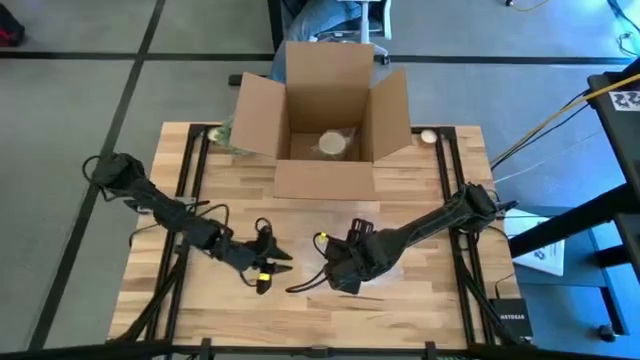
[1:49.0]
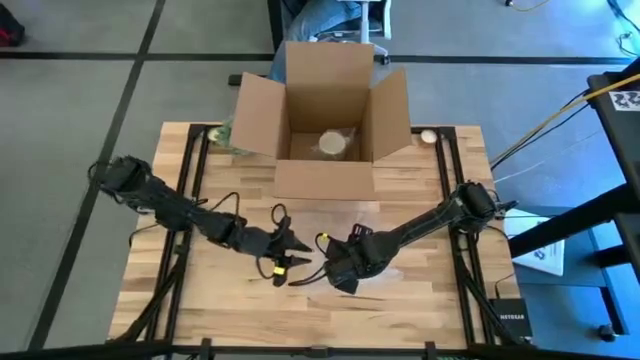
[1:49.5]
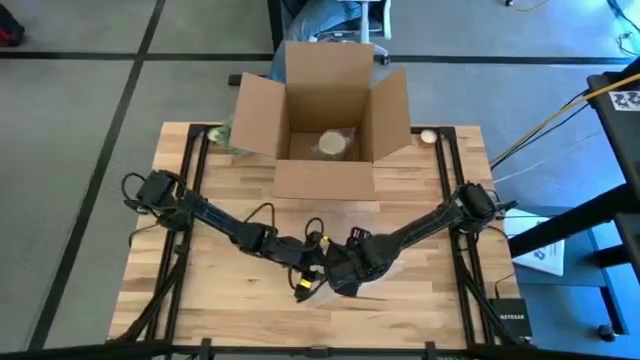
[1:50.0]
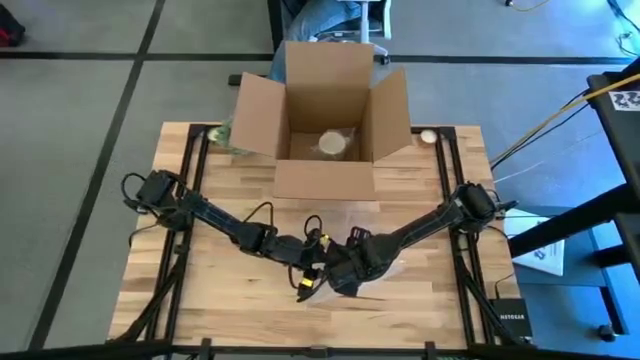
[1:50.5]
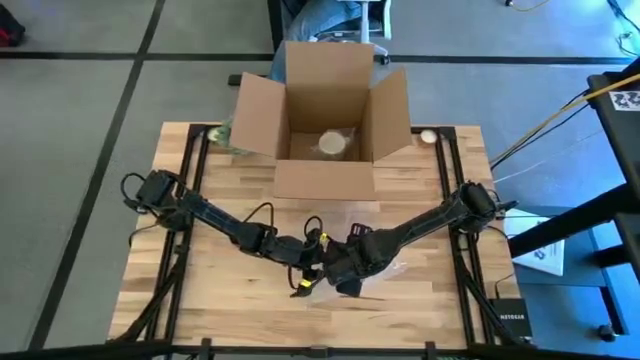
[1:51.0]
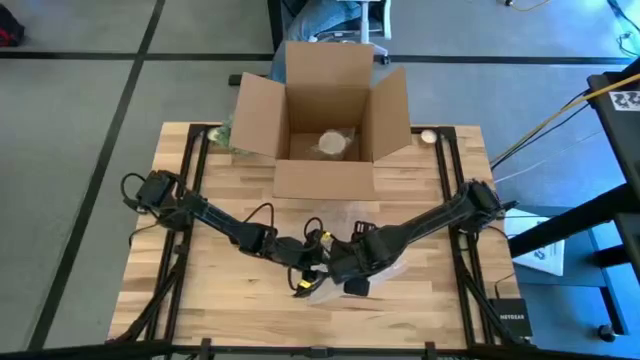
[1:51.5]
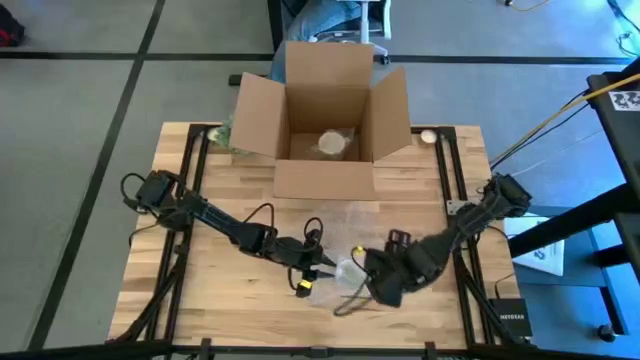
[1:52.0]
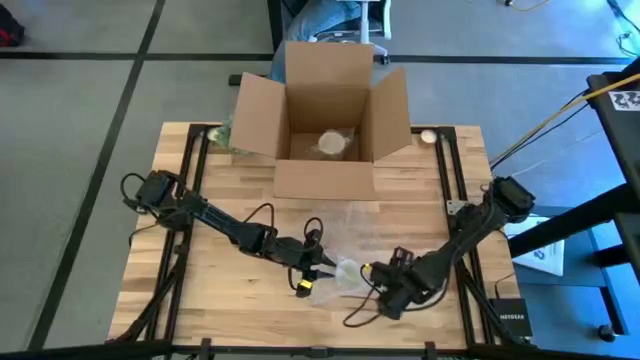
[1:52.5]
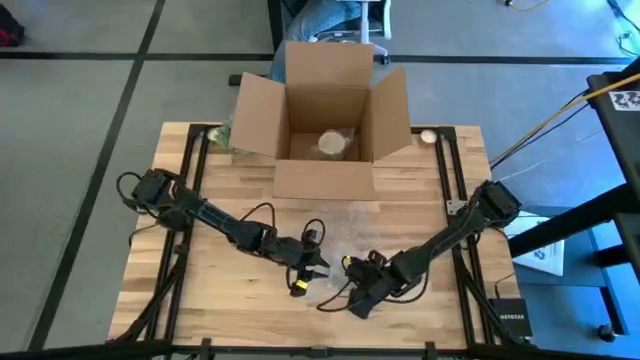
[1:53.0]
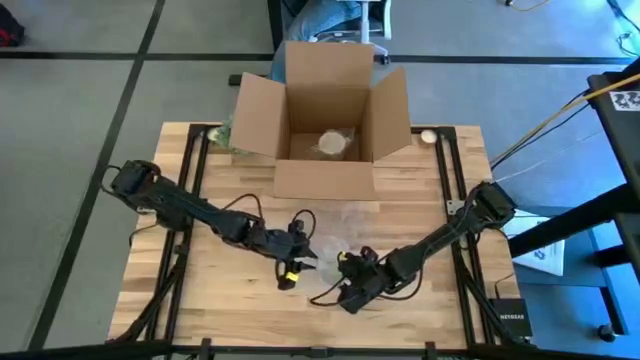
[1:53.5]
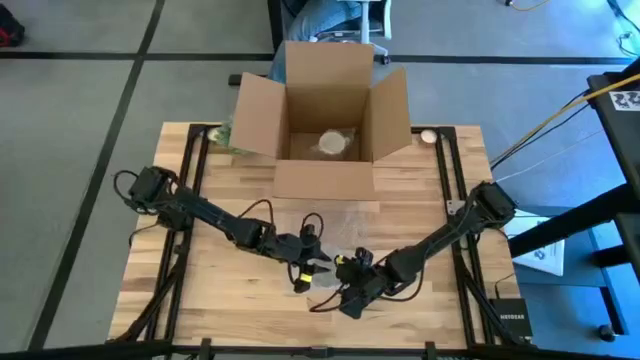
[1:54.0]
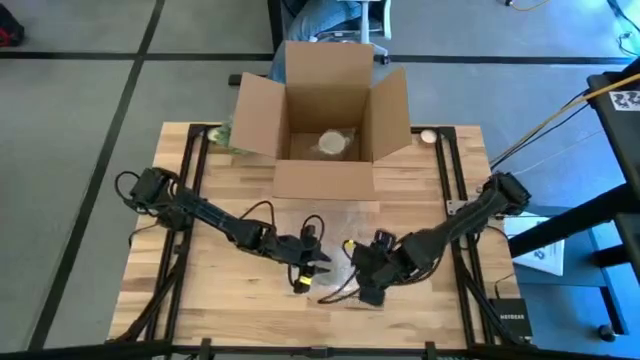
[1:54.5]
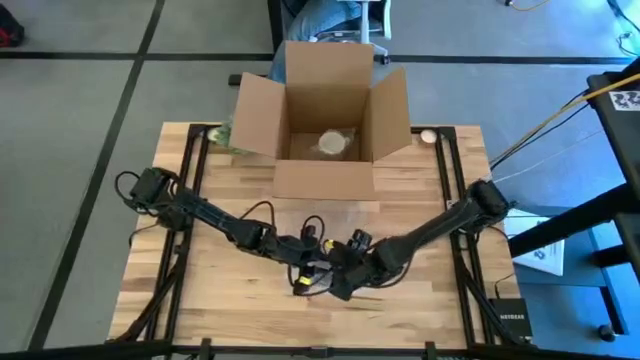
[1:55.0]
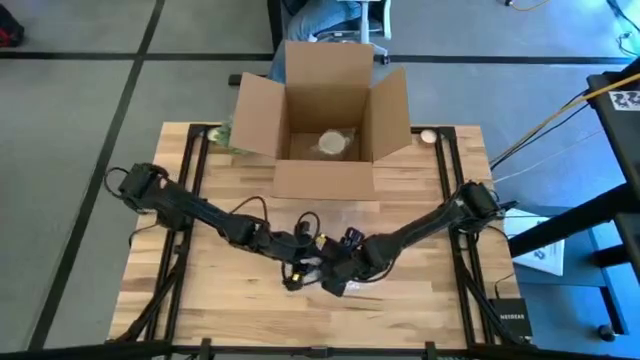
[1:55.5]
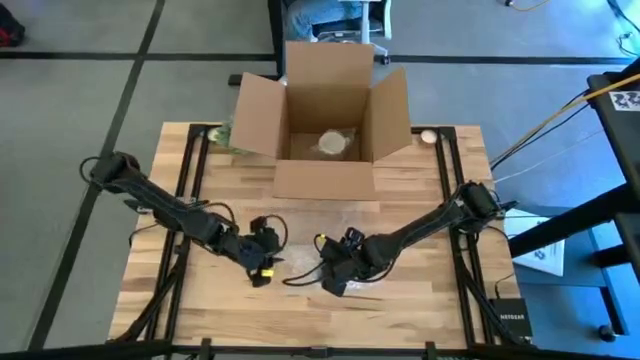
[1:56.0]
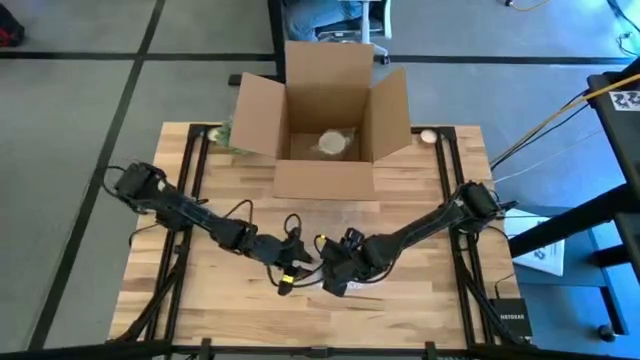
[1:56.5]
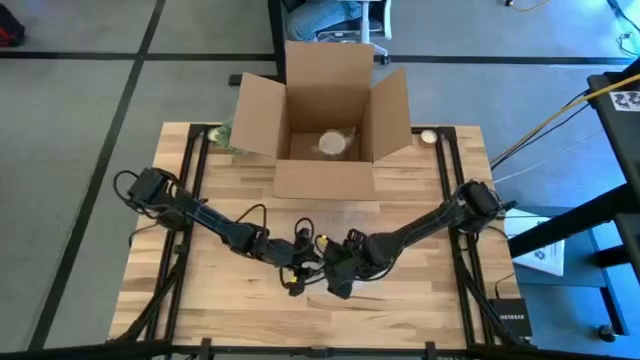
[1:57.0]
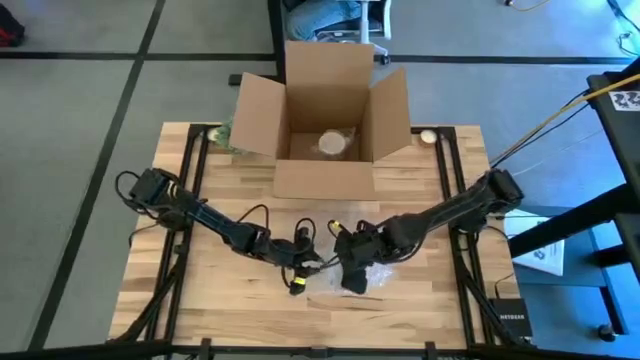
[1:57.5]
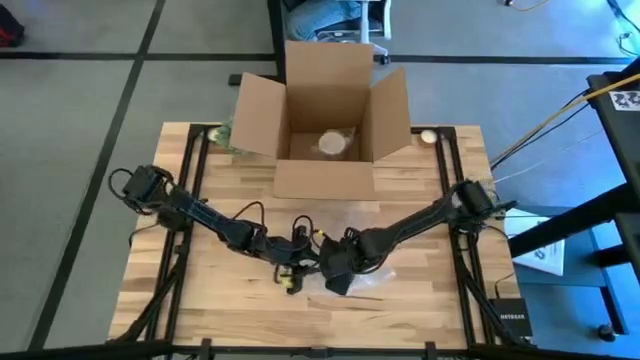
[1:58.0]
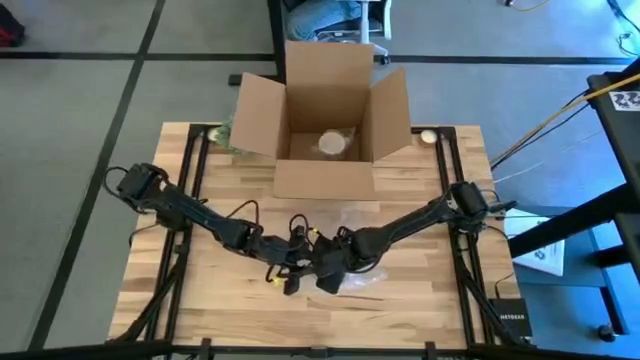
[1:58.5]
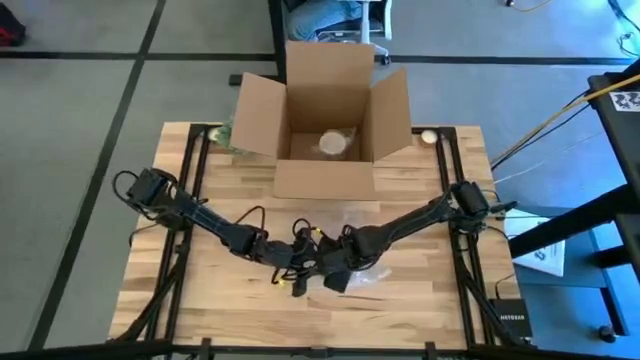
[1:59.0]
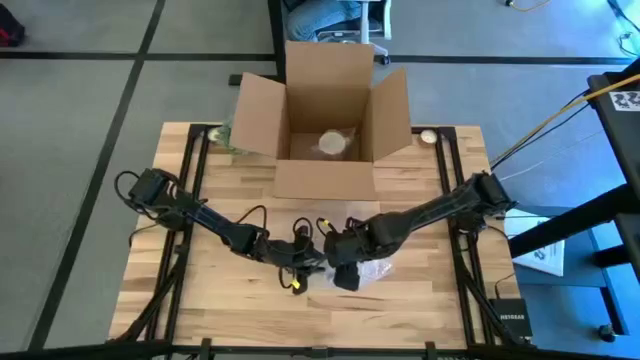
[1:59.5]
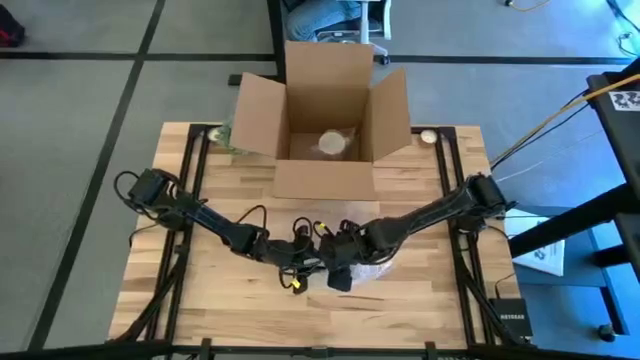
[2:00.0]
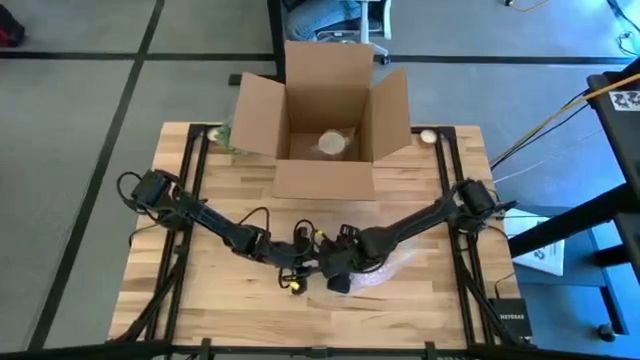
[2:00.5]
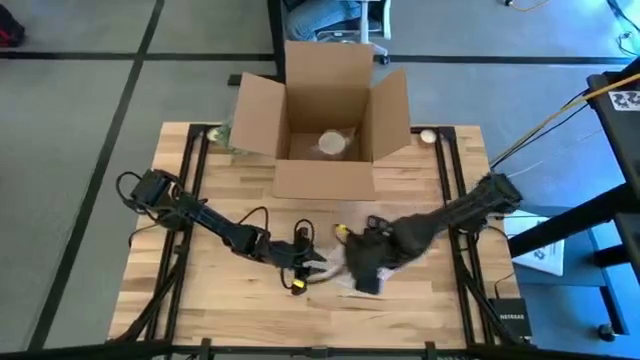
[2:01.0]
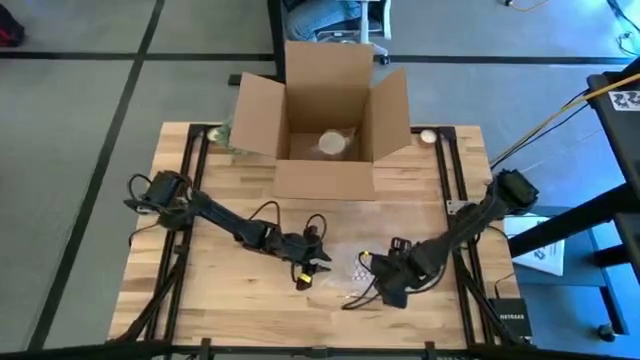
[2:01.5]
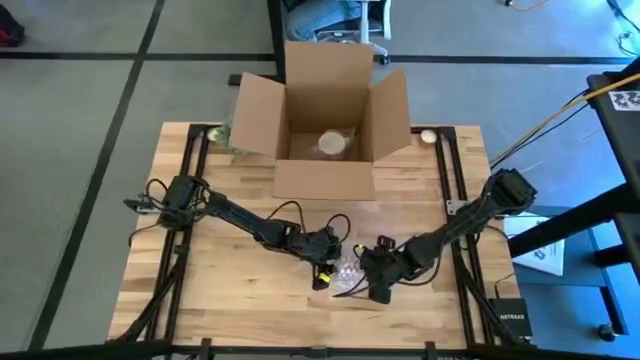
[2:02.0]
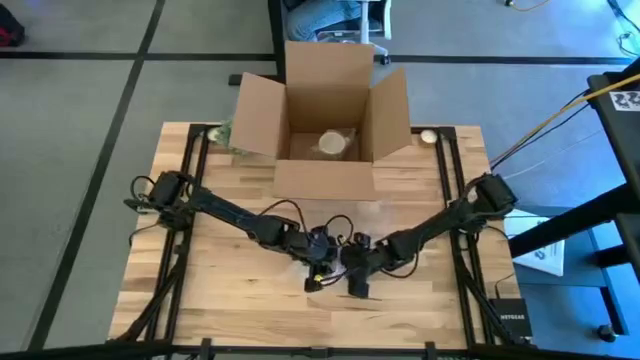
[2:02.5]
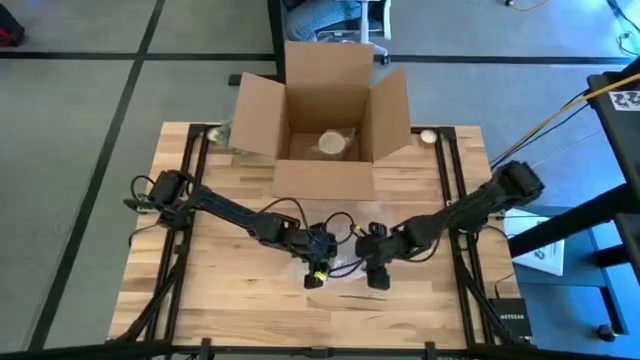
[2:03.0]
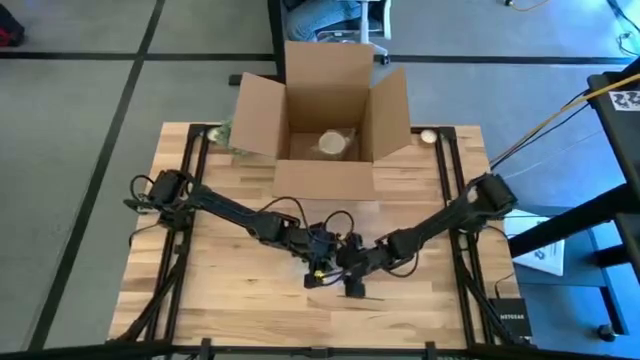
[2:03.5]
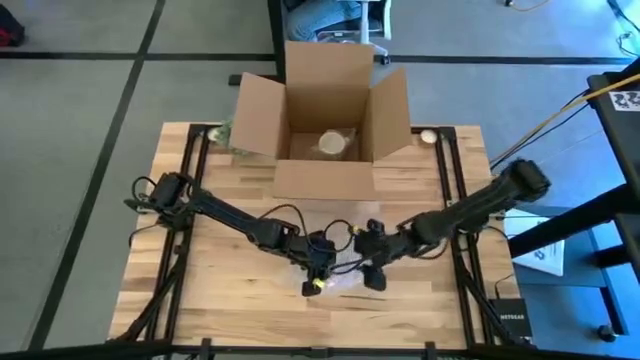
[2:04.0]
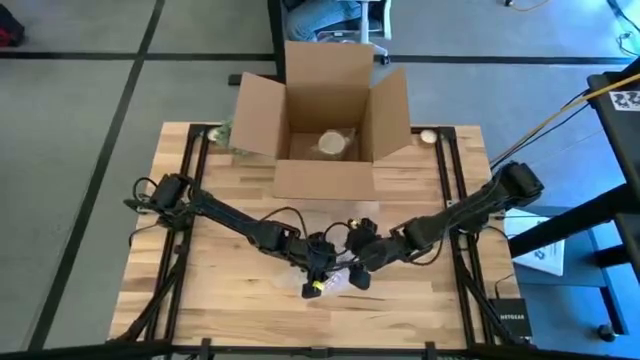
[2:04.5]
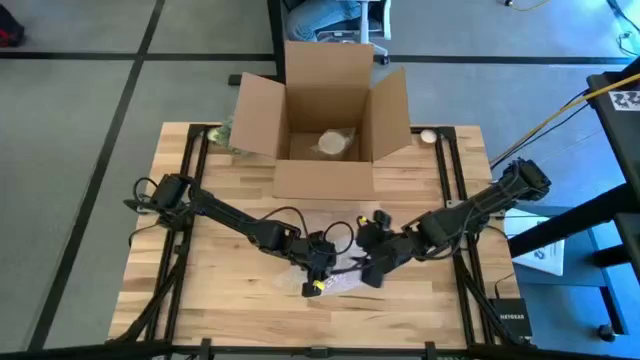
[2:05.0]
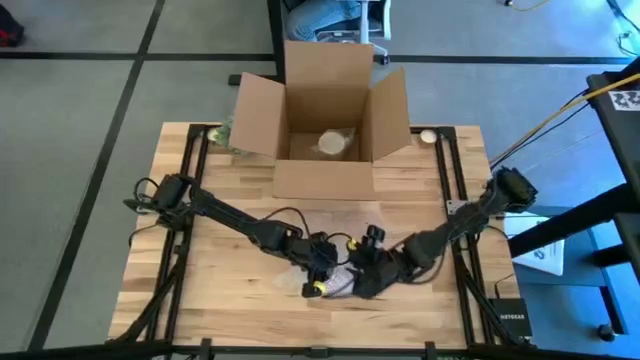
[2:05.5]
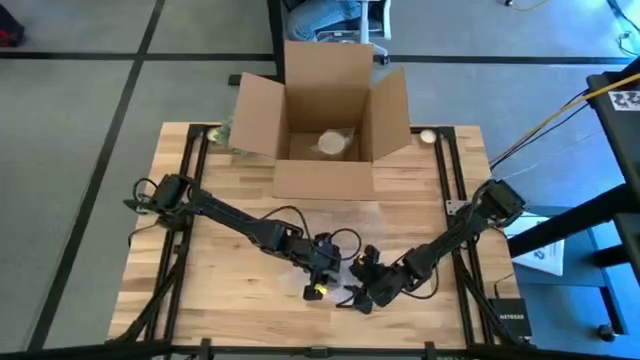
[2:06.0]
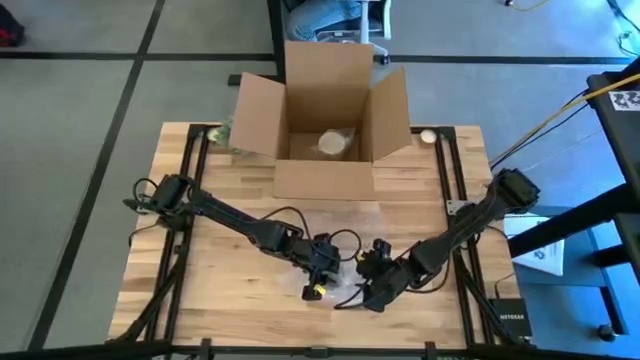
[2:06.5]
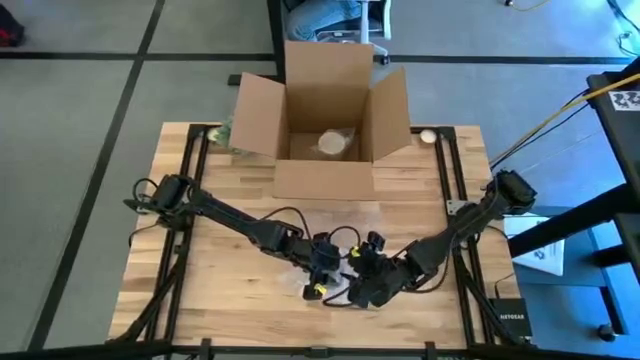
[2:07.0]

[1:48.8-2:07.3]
Task: wrap mug
Wrap the red mug with bubble wrap

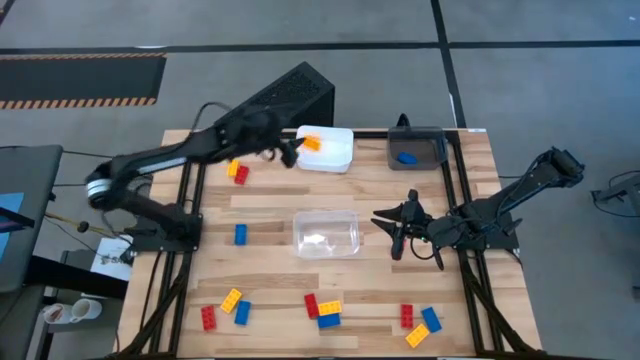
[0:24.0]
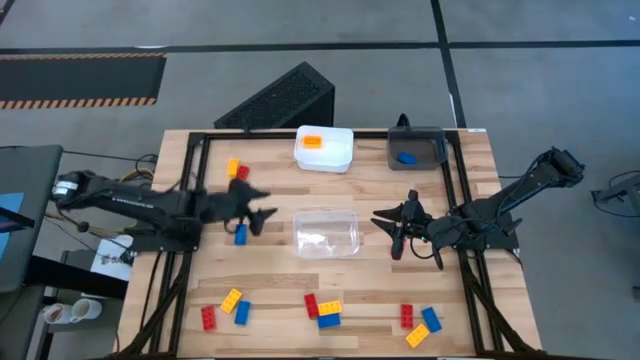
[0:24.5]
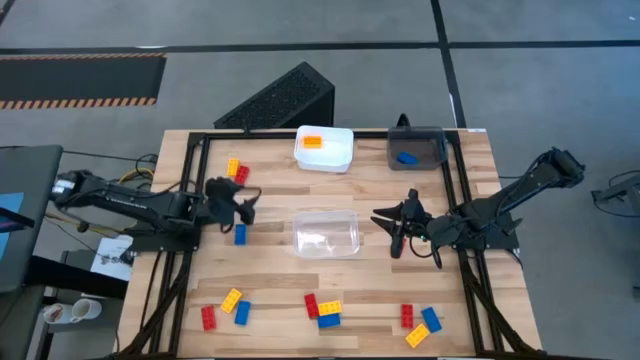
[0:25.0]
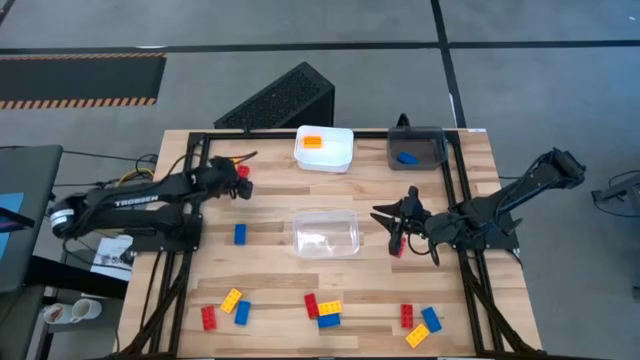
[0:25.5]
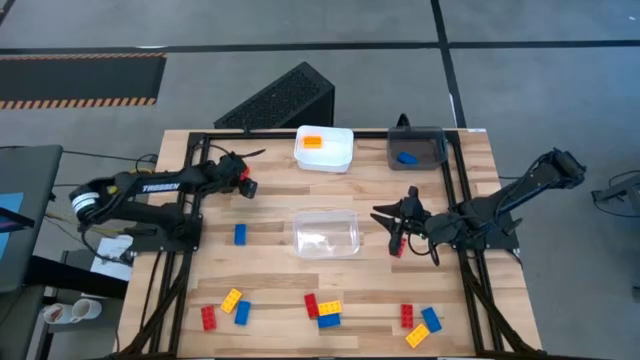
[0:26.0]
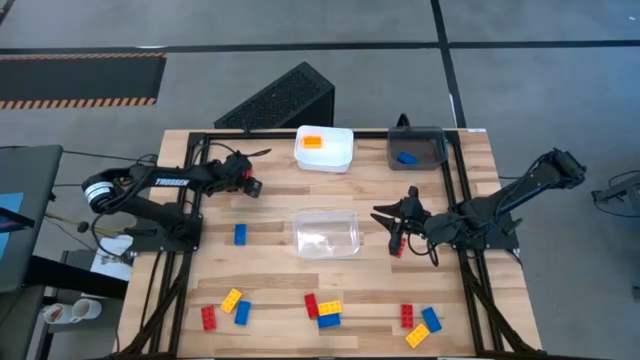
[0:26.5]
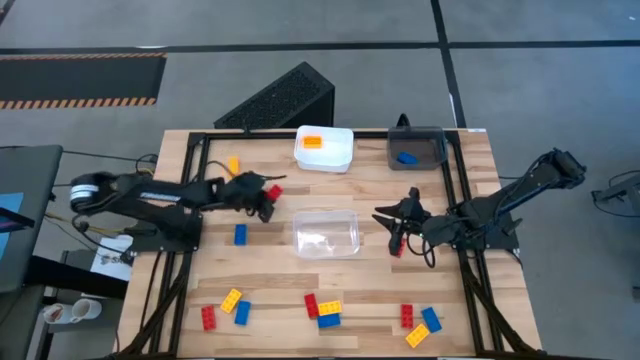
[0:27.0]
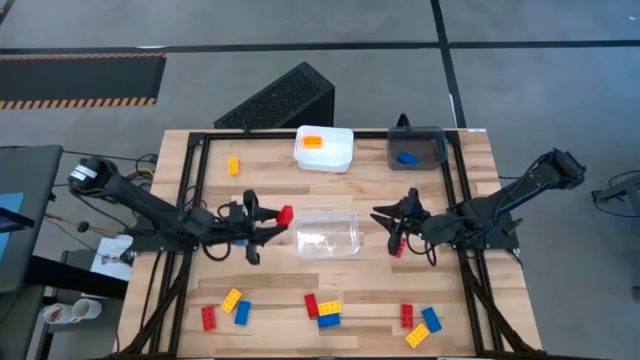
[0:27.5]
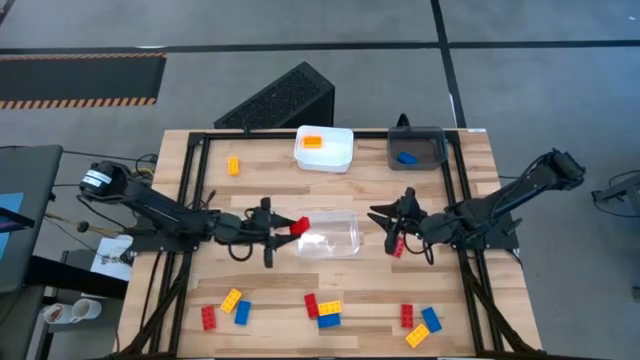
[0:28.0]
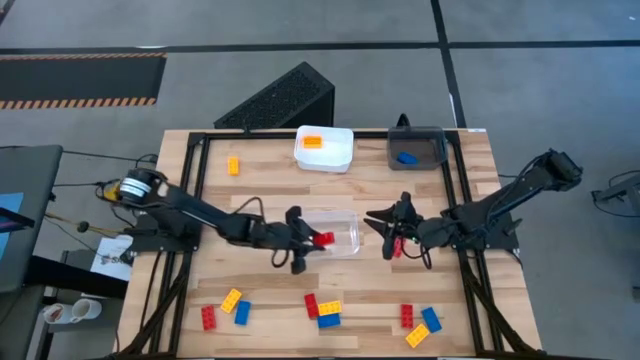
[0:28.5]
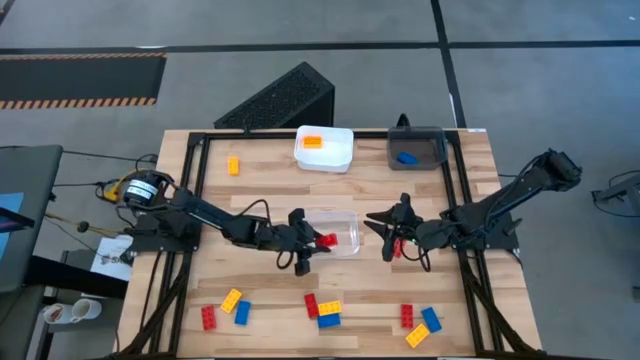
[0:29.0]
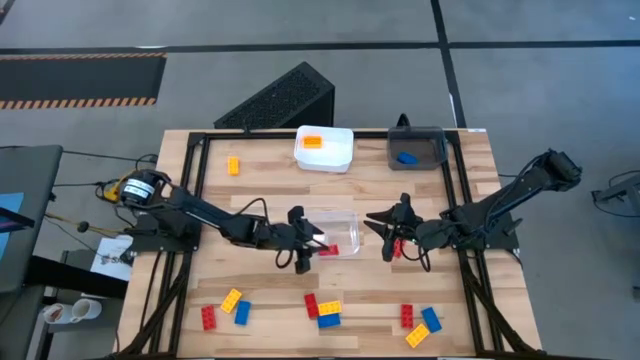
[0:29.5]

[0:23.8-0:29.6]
Task: Sort & place blocks by color
Put the red game piece into the transparent bin
